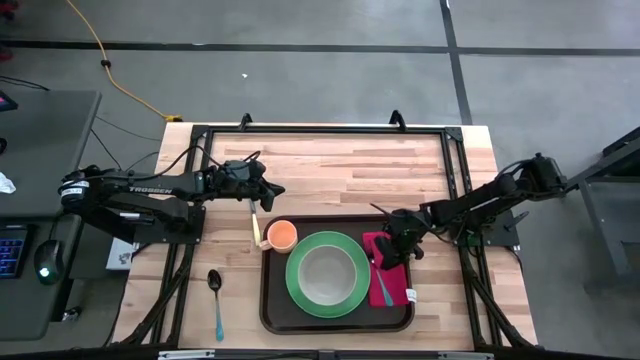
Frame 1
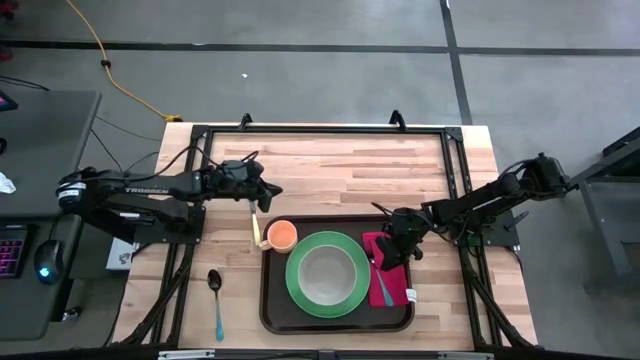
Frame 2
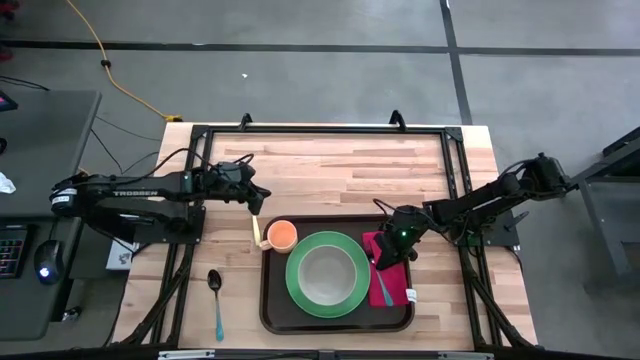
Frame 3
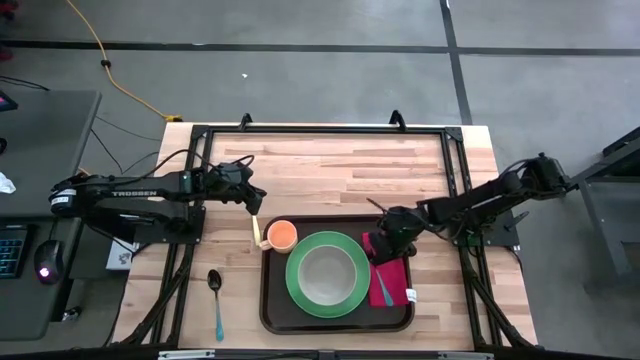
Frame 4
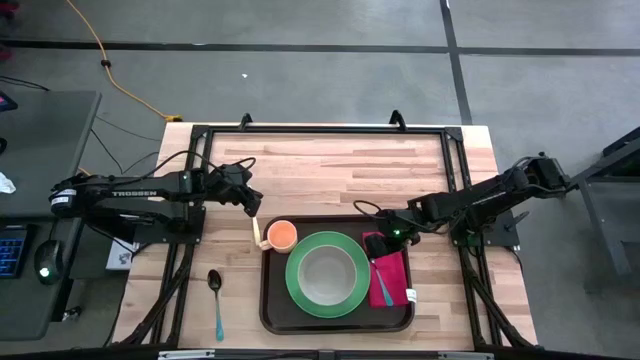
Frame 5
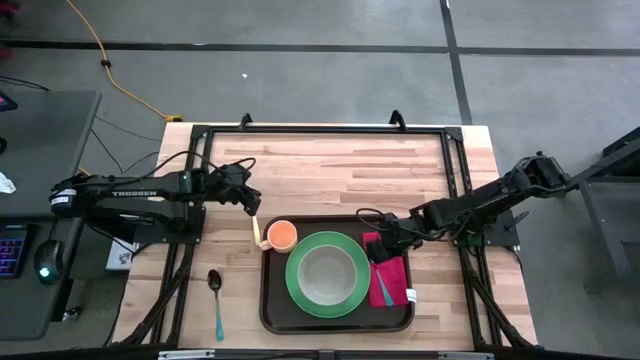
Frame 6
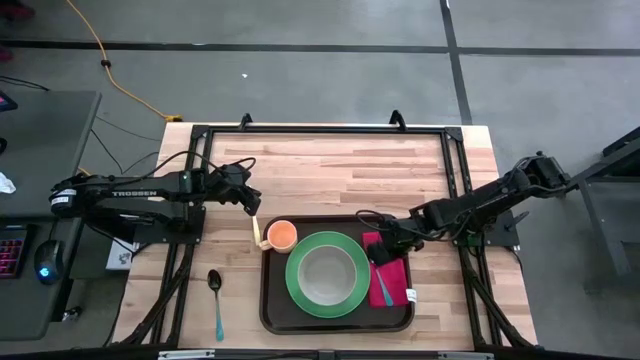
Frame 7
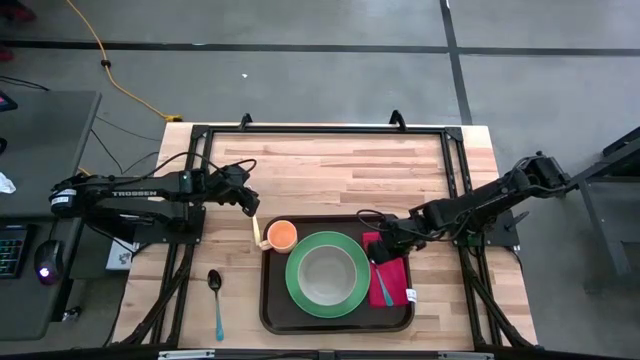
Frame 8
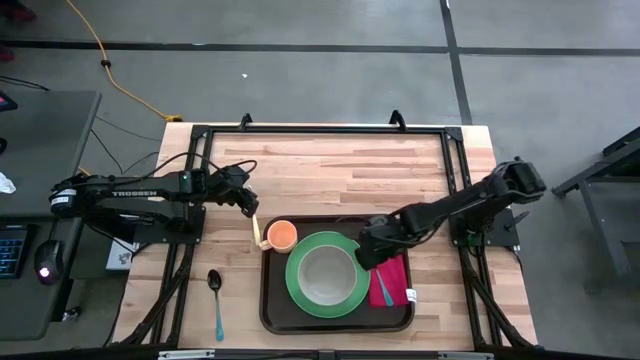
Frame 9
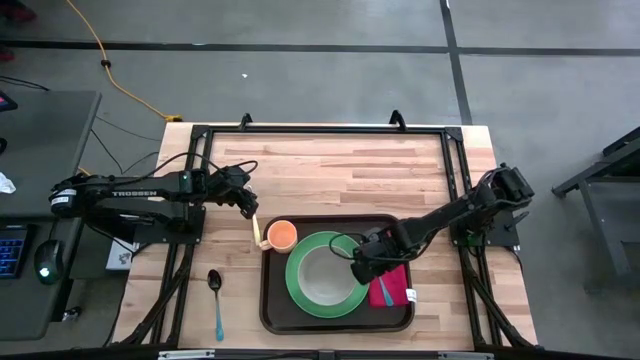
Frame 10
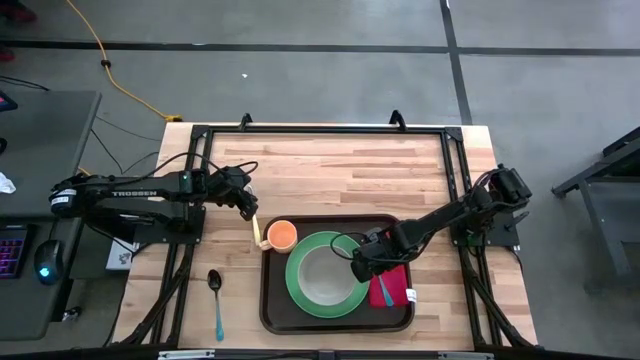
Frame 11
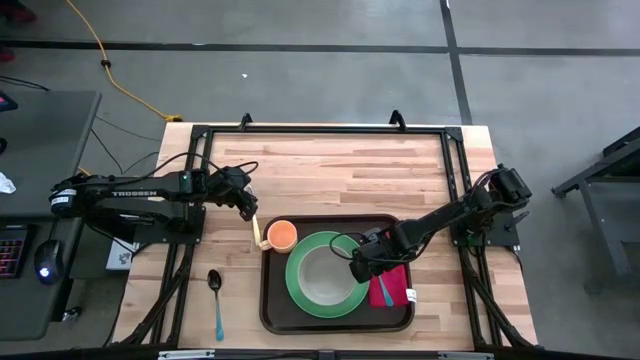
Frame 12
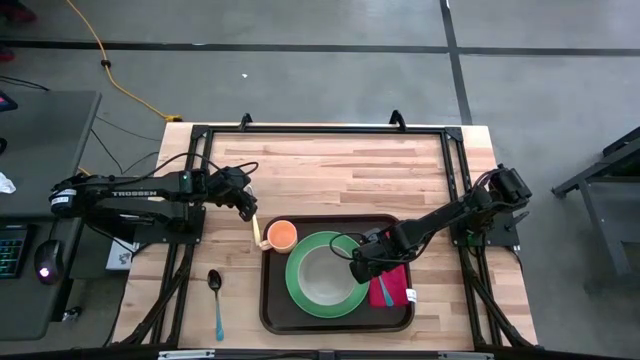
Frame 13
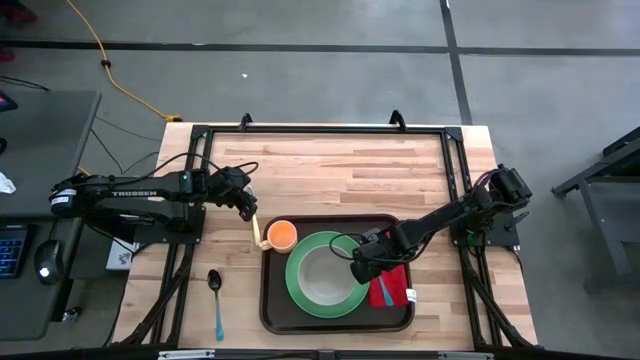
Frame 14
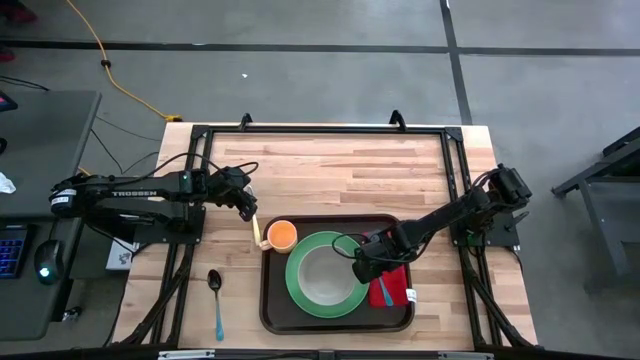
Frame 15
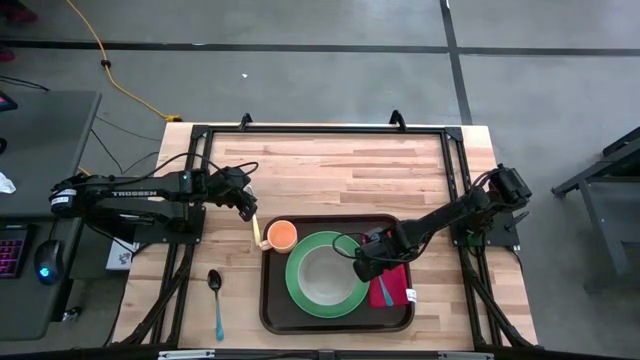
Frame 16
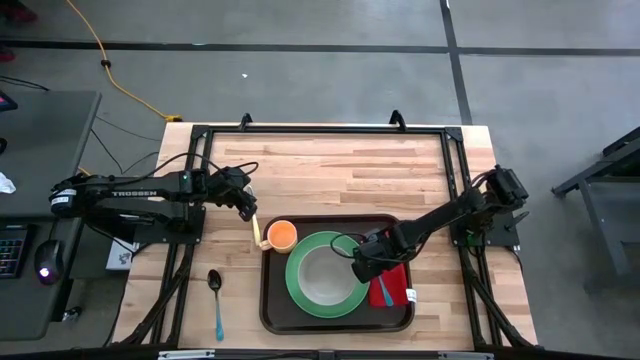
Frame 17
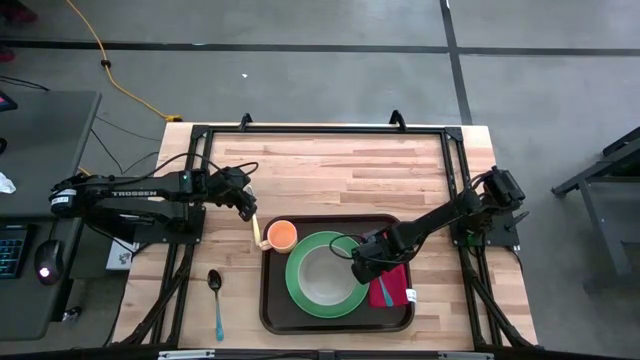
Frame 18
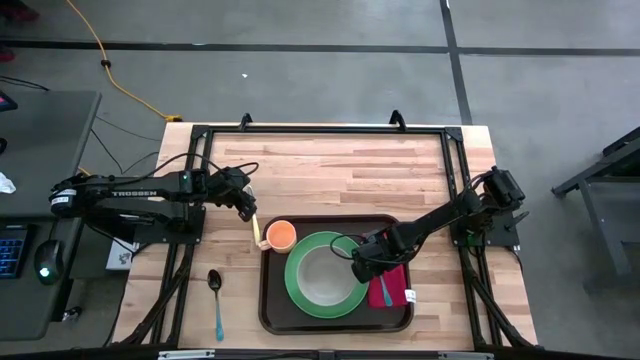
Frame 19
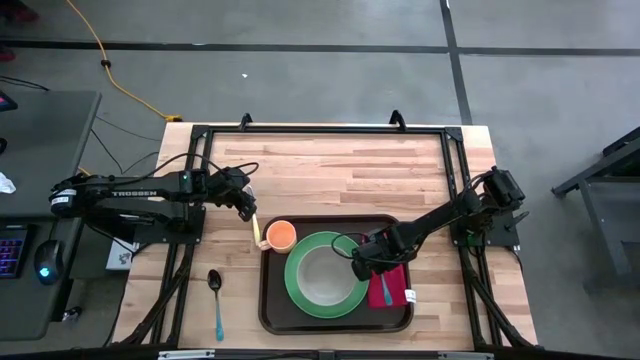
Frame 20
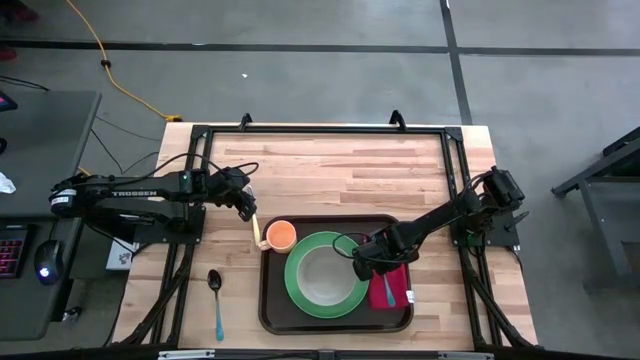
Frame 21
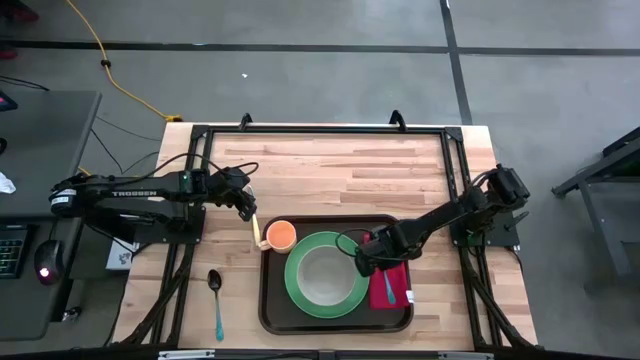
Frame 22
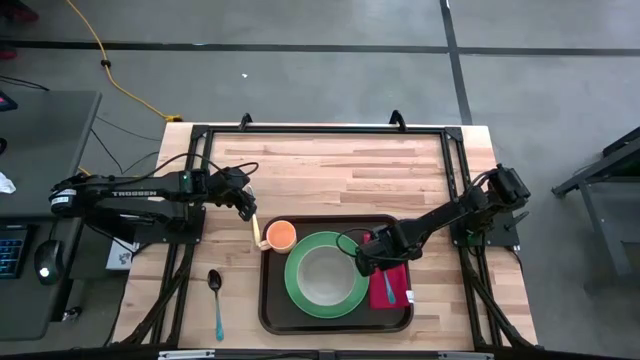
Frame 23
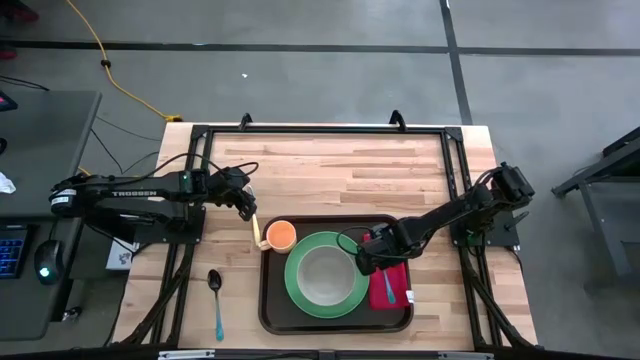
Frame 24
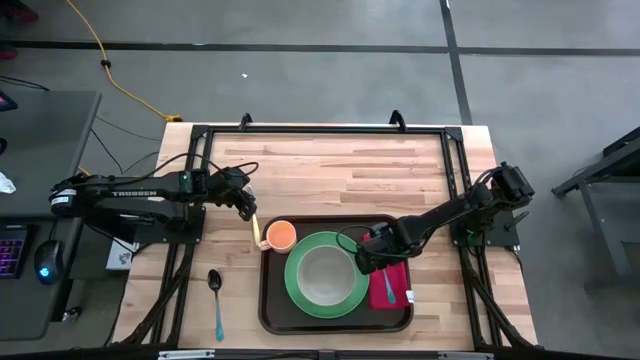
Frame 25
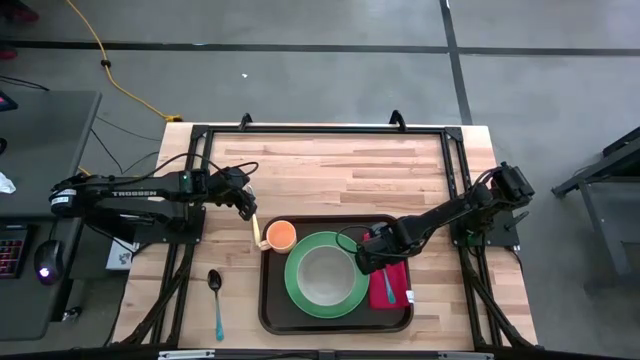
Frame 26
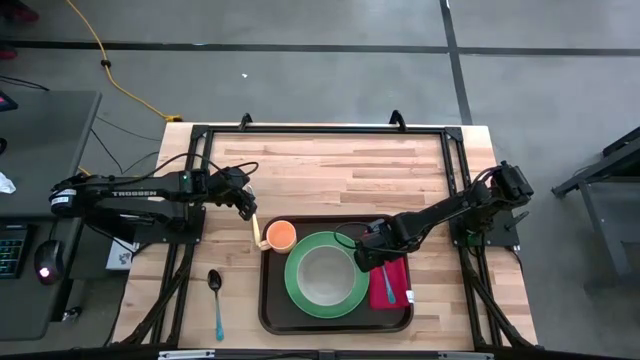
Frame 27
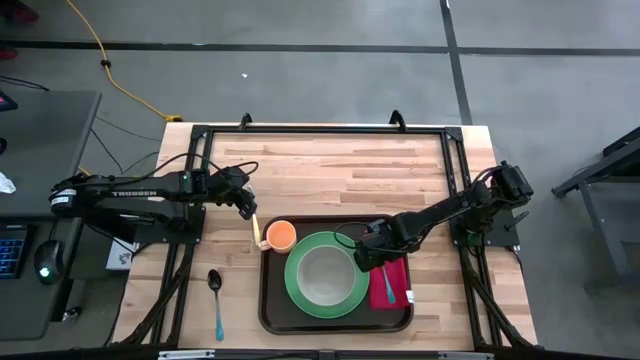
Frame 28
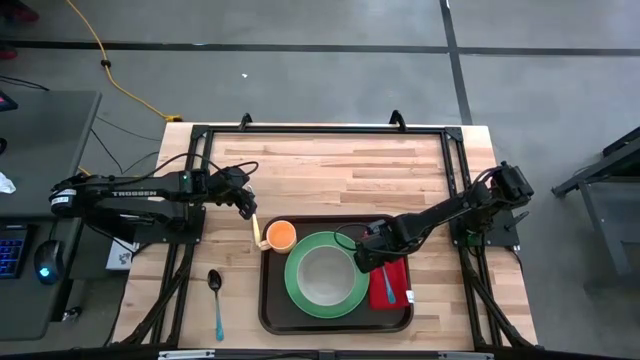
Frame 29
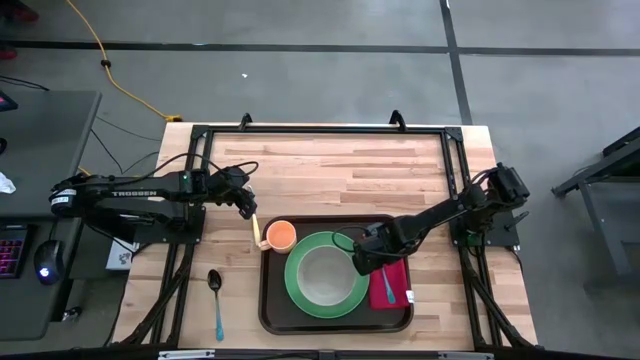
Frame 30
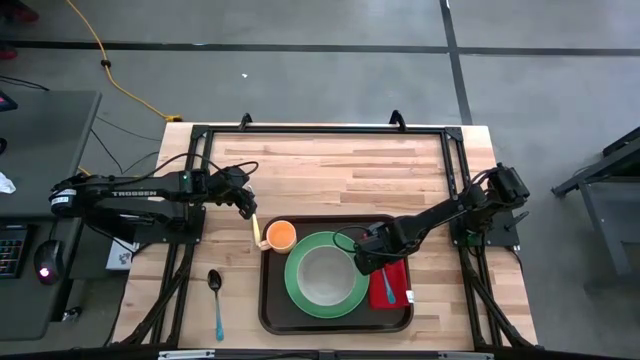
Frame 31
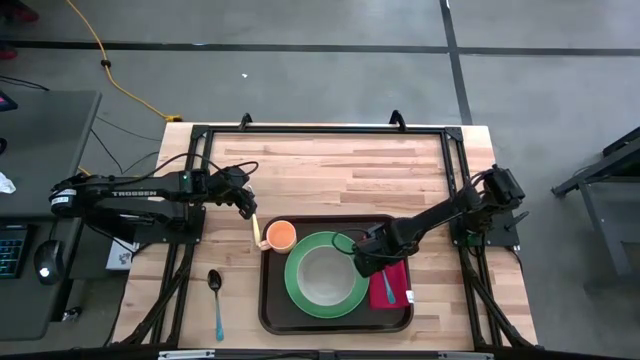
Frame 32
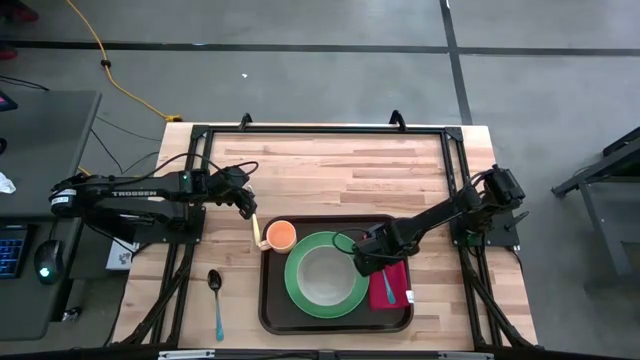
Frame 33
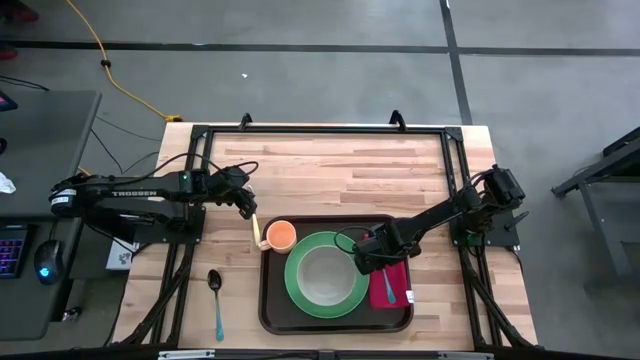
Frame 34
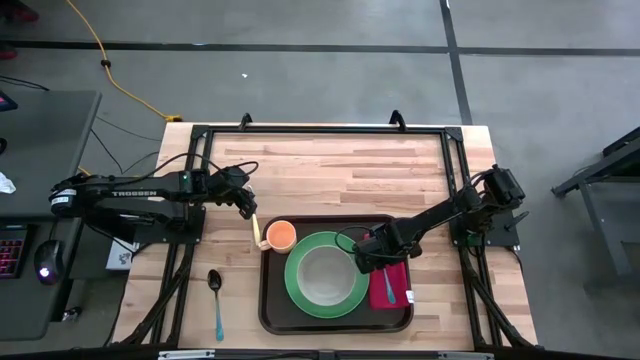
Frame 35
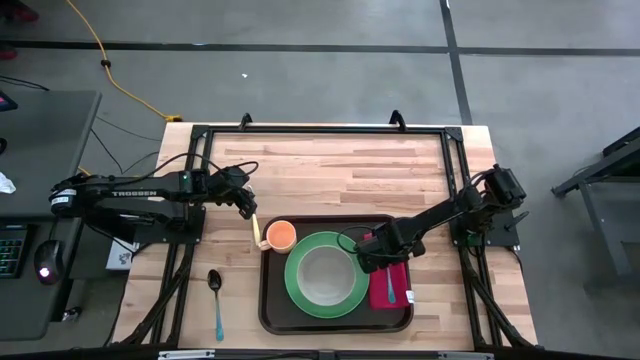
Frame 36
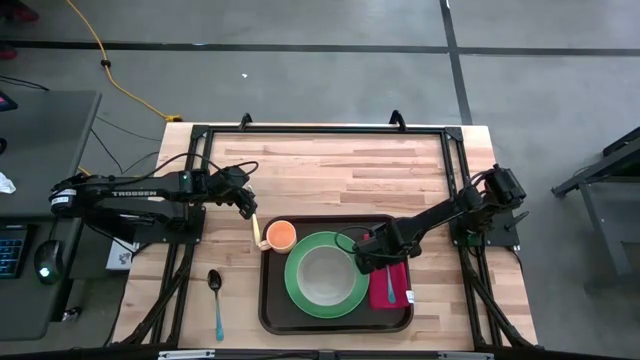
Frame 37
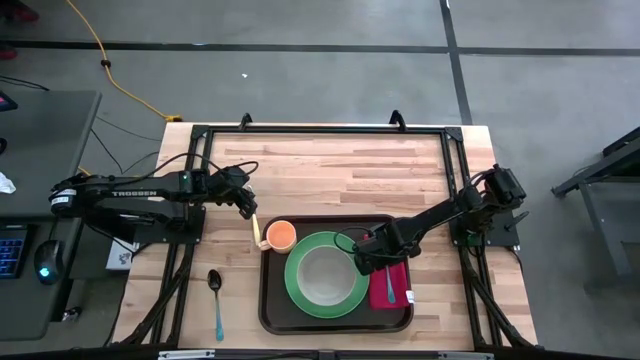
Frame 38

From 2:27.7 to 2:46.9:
Task: Set up tray
Put the blue fork on top of the red napkin on the black tray
